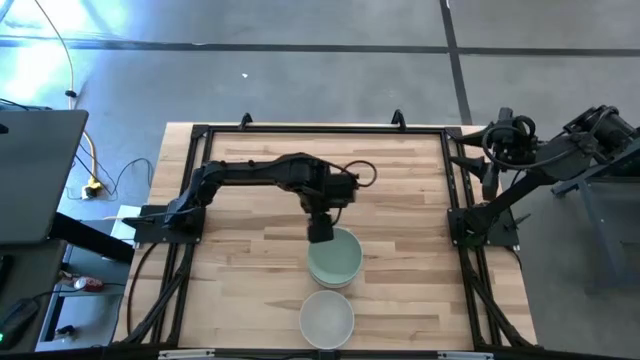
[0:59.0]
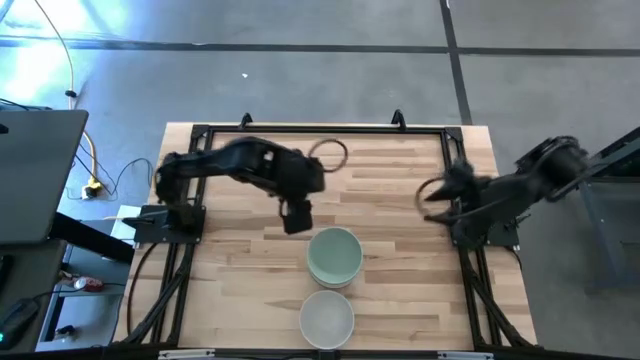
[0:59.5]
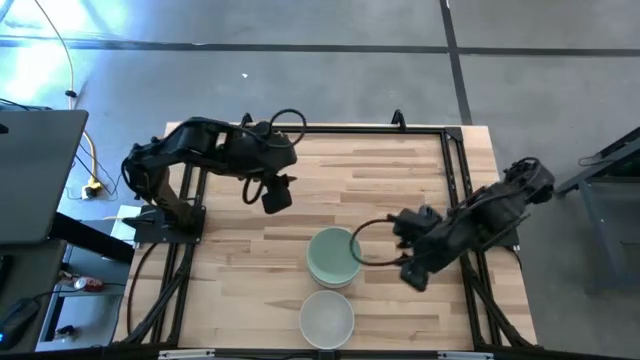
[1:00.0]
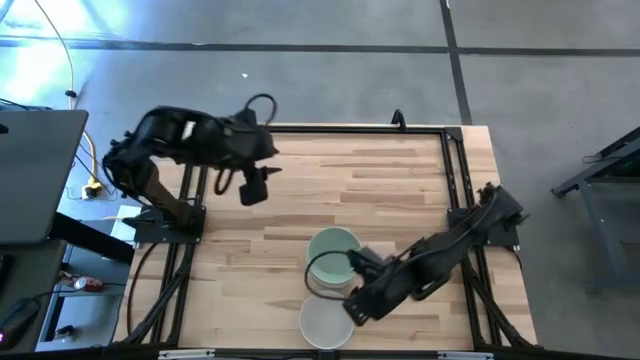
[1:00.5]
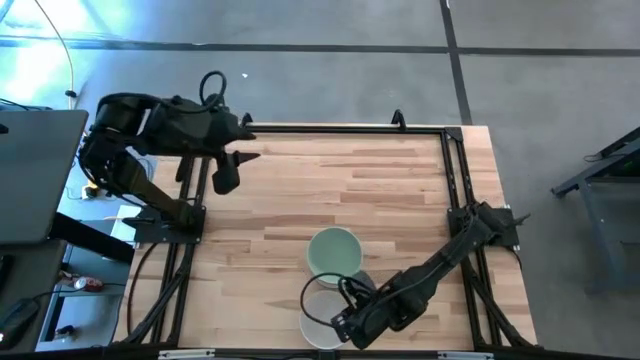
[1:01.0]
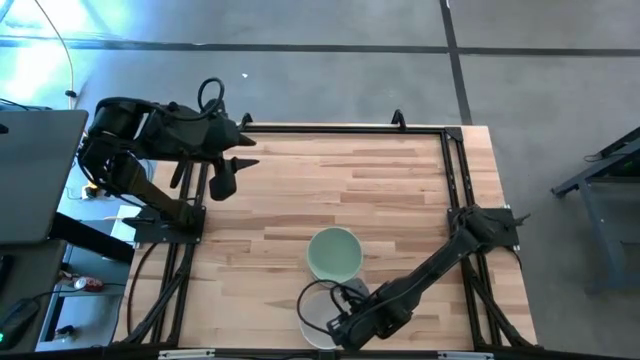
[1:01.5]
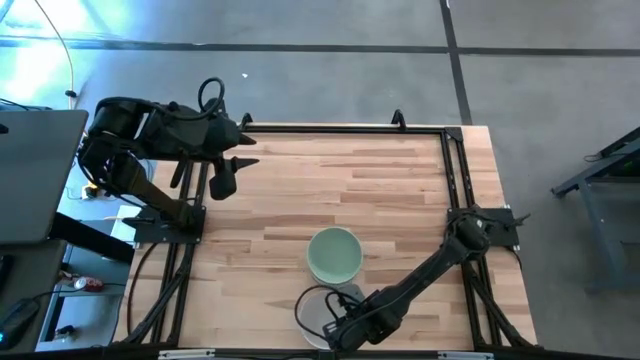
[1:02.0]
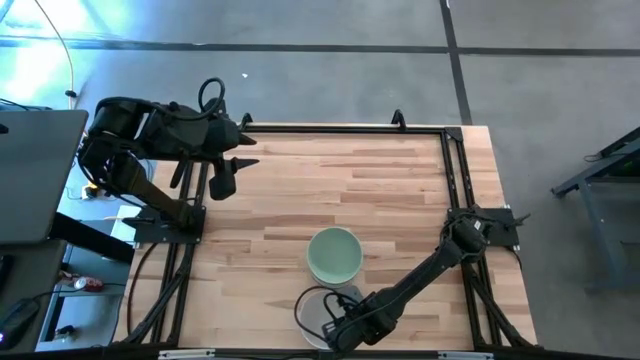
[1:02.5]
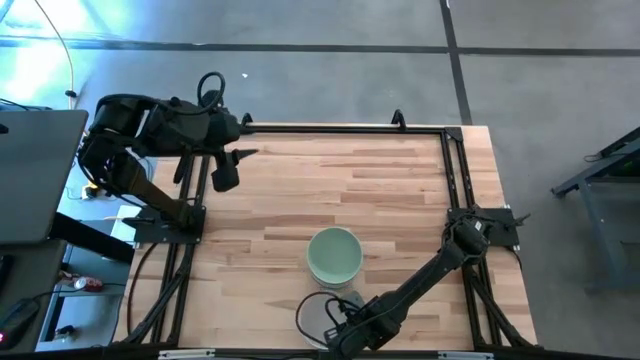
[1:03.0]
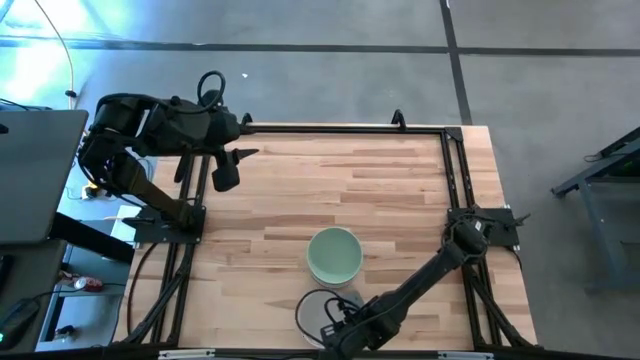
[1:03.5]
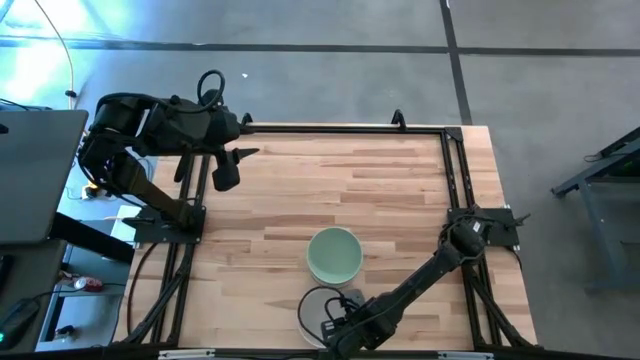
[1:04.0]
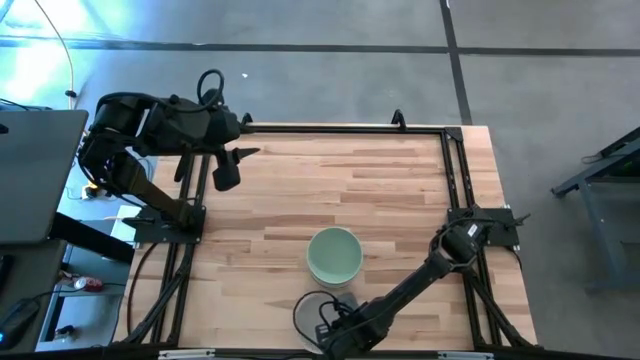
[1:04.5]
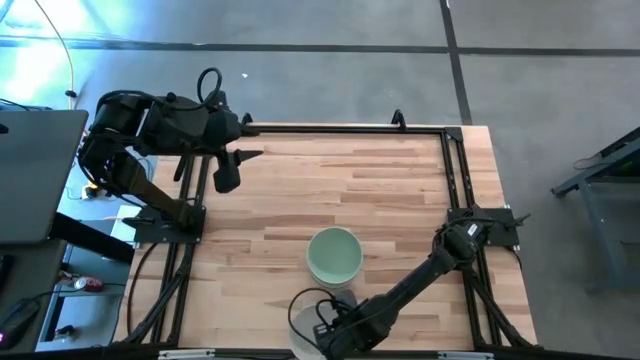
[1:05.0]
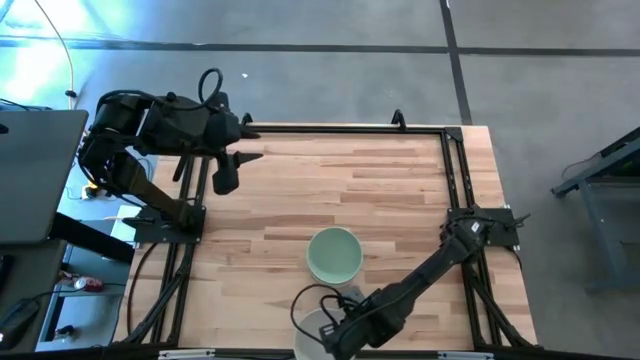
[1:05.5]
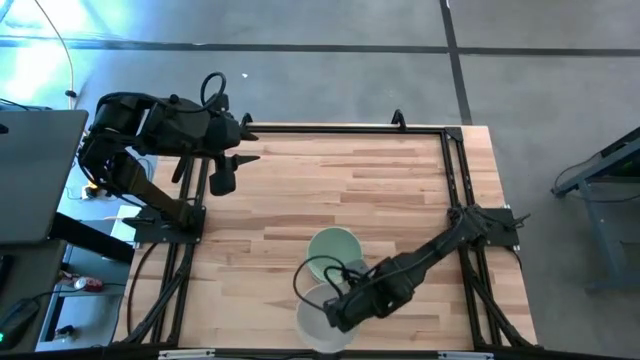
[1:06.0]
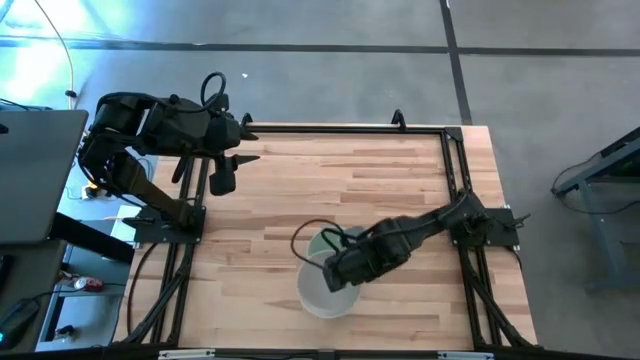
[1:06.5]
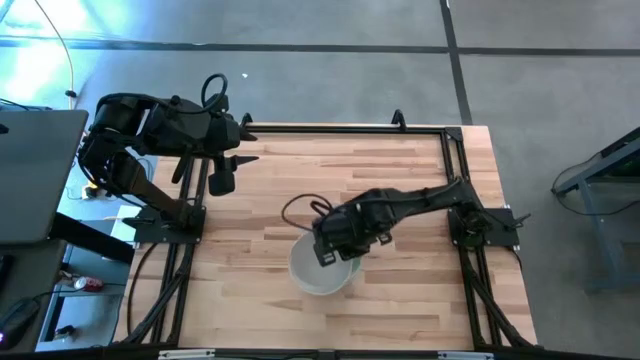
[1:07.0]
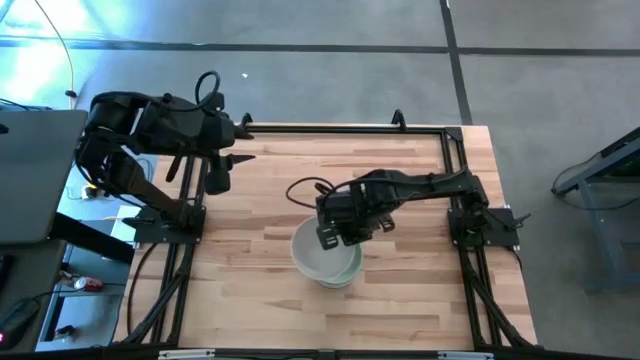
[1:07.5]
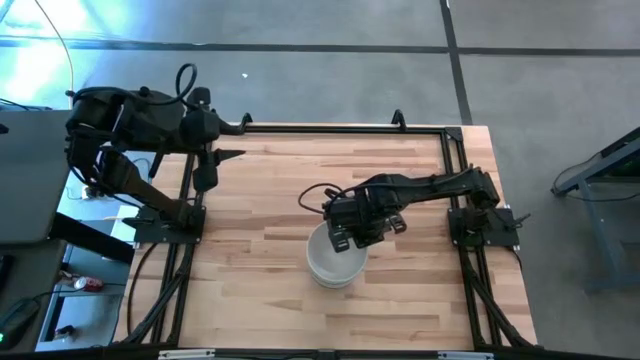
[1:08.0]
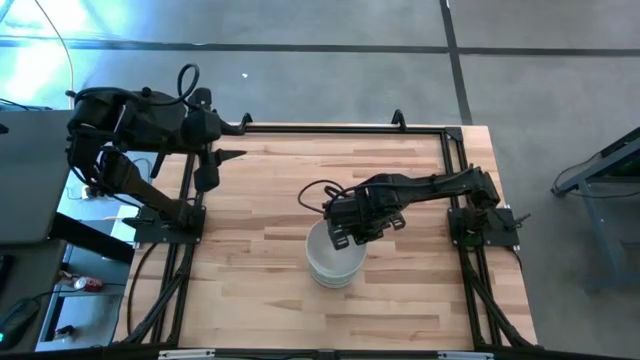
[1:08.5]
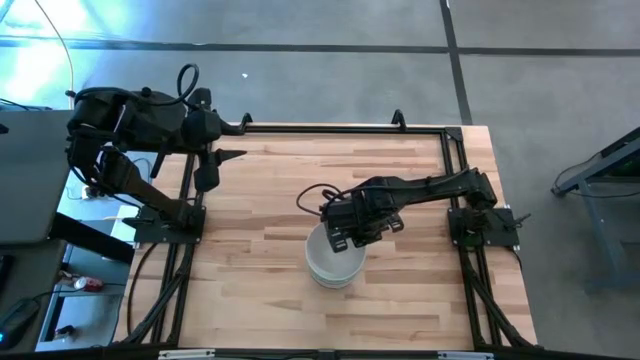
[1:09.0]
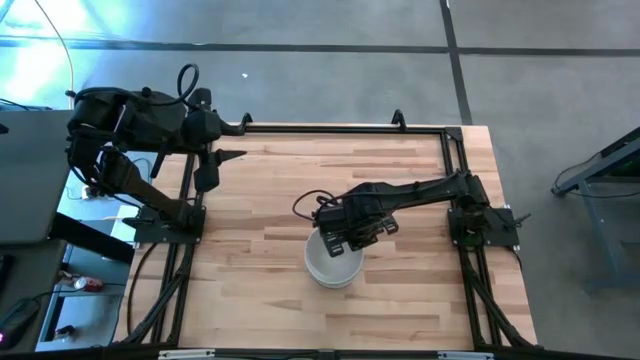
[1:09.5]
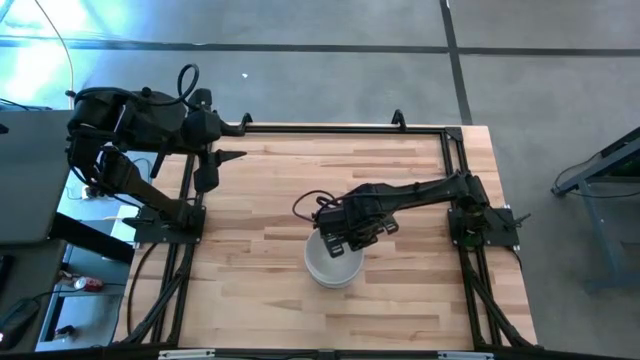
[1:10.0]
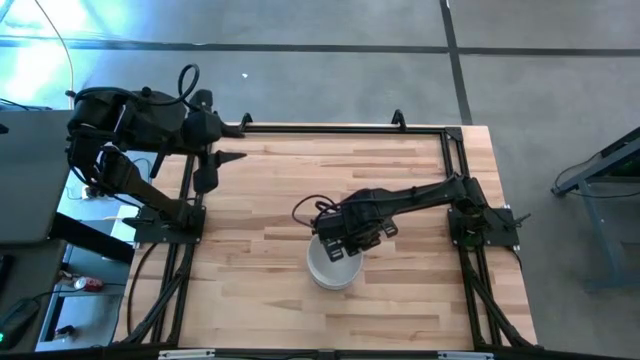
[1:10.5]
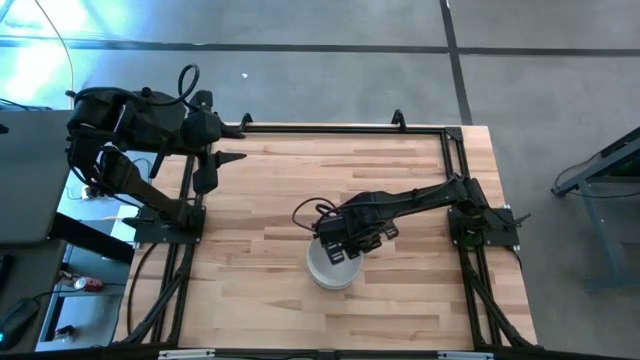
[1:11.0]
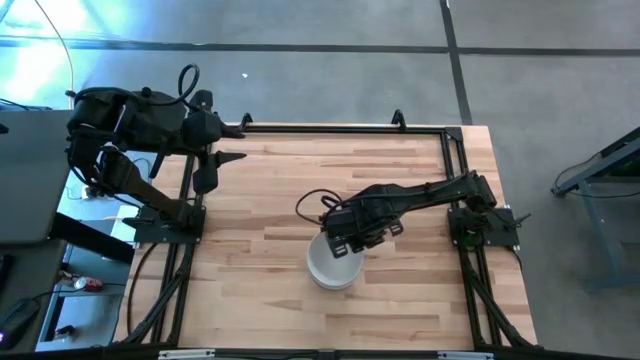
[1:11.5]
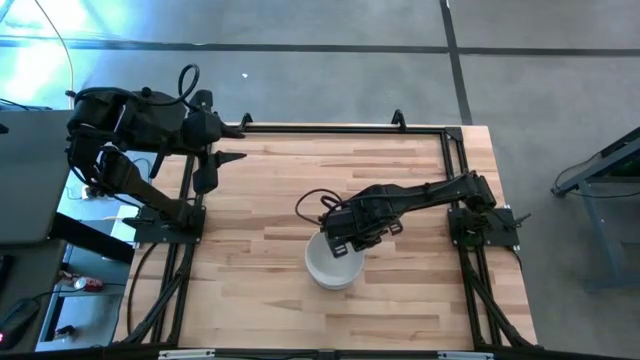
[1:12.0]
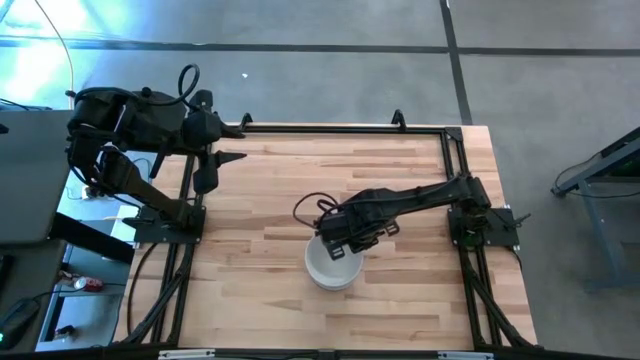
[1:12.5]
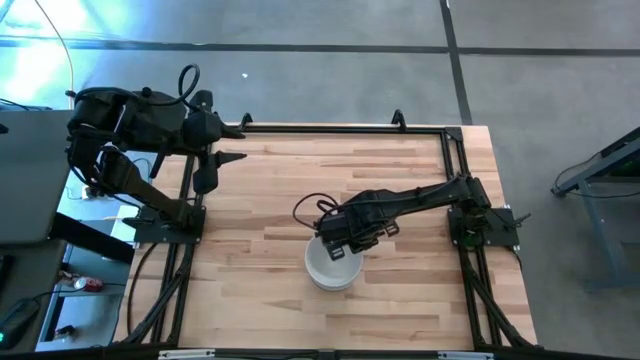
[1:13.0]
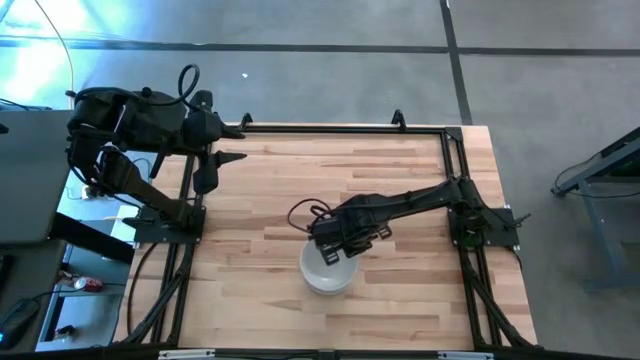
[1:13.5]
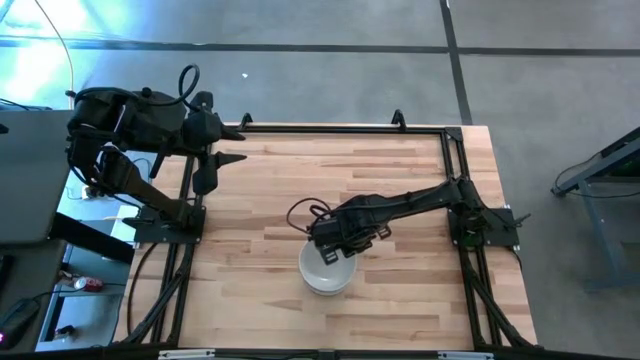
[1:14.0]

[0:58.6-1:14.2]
Task: Nest bowls inside each other
Stack the white bowl on top of the blue bowl

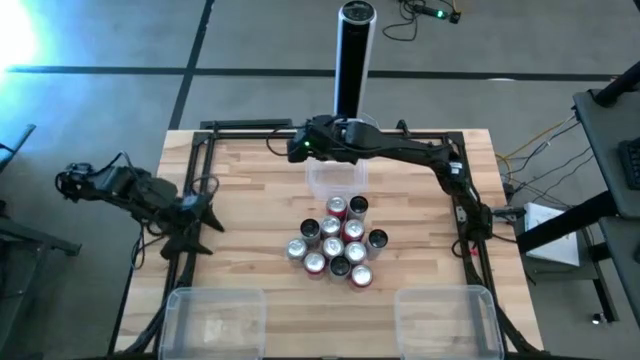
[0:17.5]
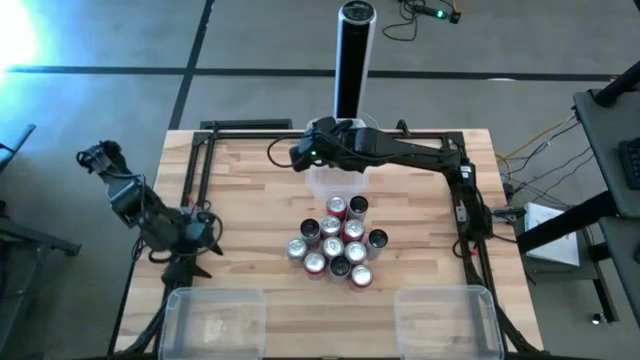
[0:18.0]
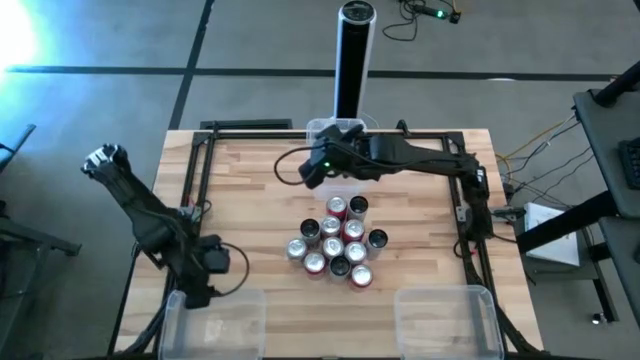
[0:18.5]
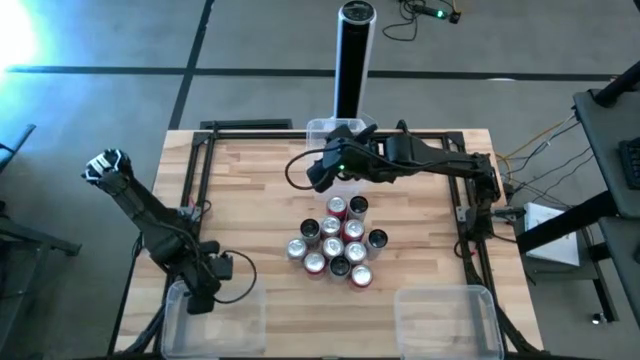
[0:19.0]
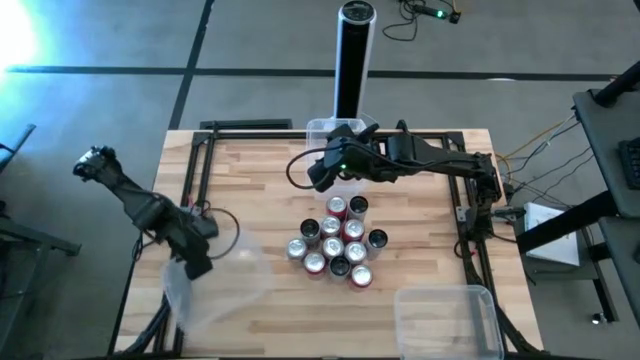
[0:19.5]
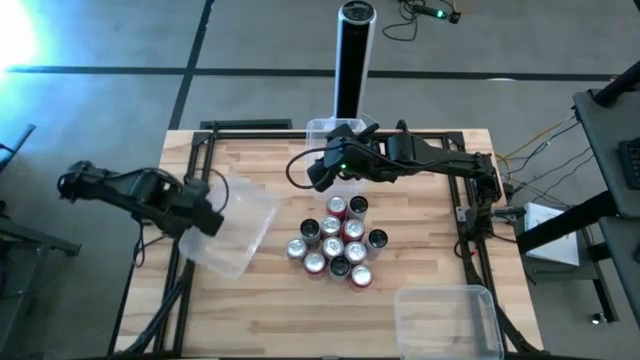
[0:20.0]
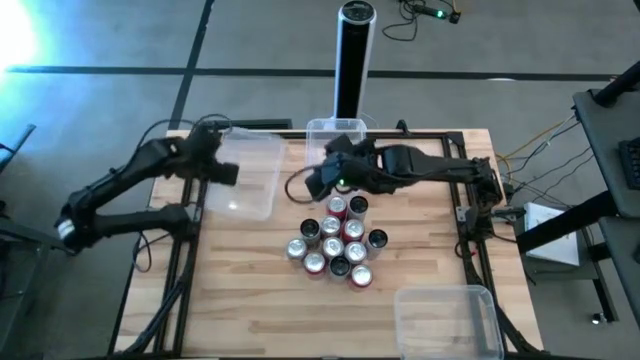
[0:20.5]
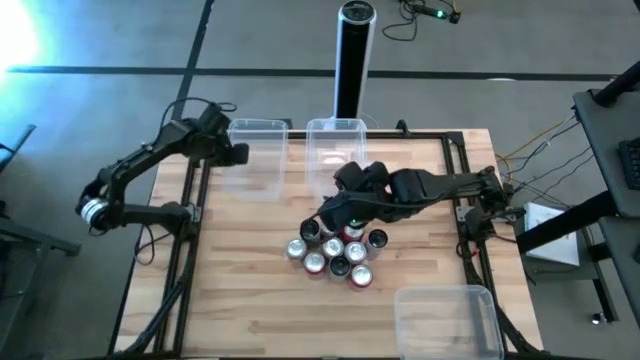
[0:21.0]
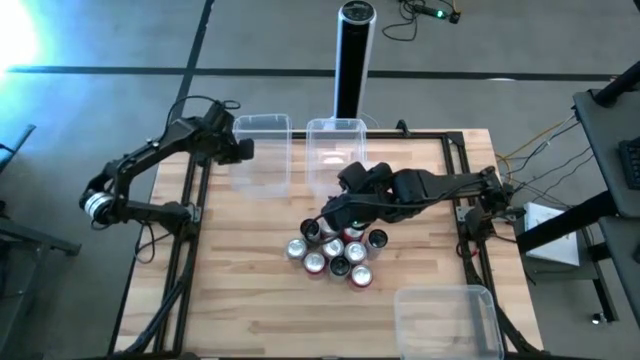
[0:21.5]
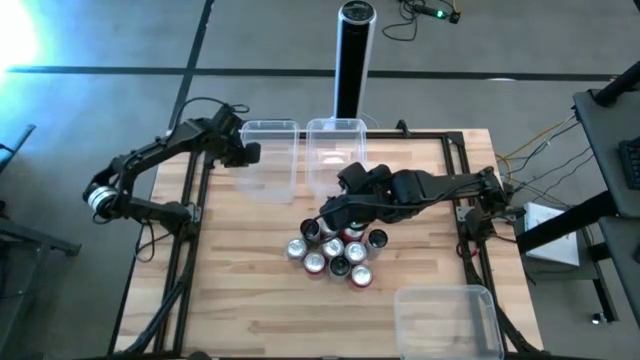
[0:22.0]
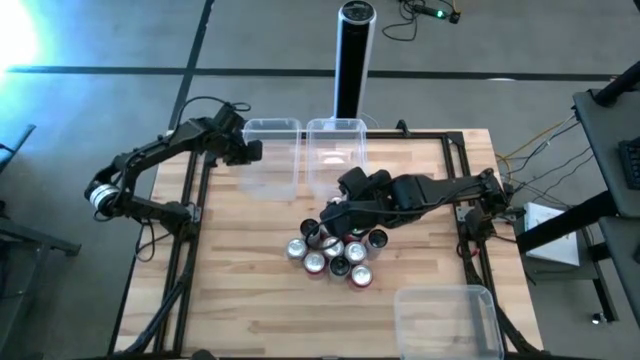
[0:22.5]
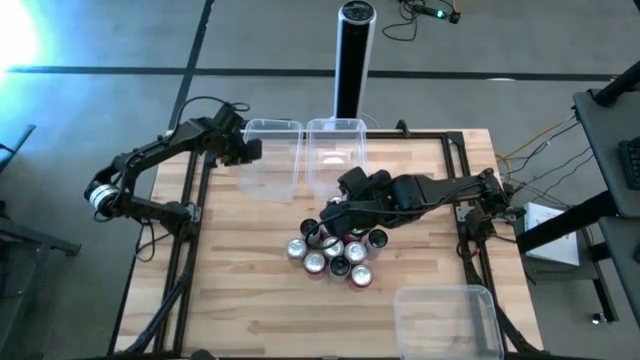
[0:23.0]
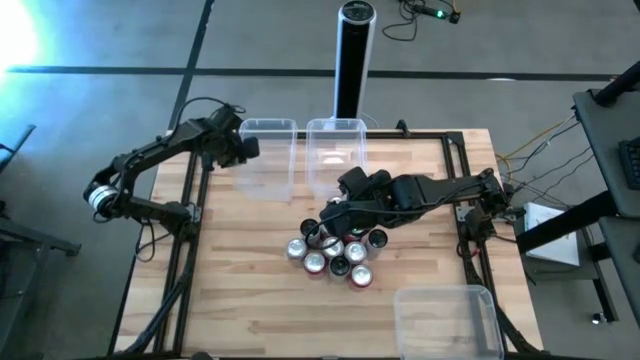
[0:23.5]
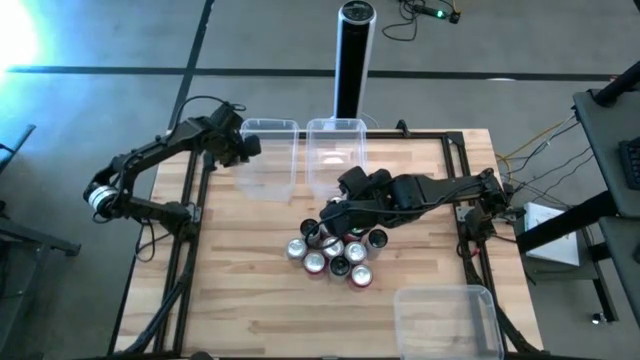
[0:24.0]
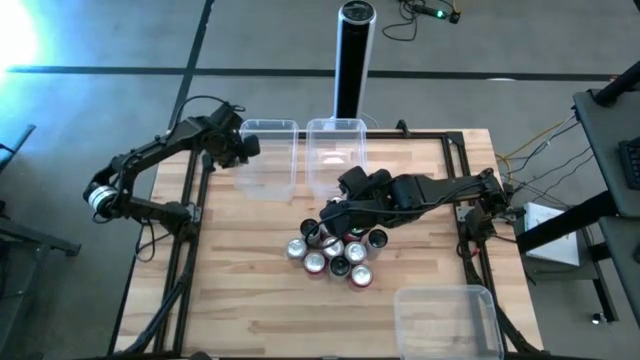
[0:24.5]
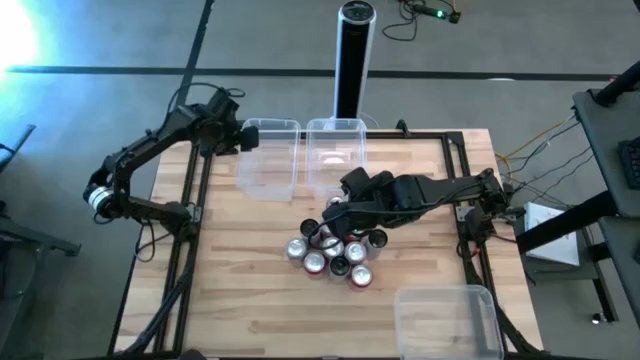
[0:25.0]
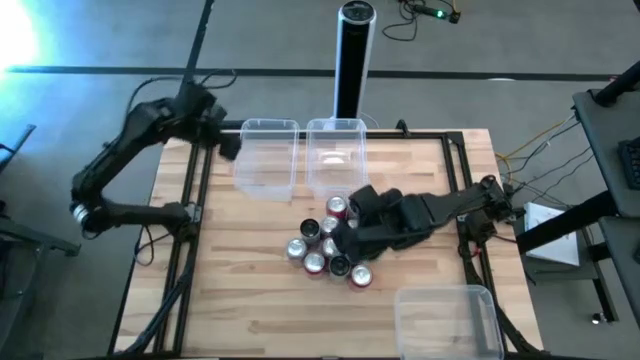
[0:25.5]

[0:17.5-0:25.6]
Task: Sort soda cans
Move the bottom left white bin to the left side of the center white bin
